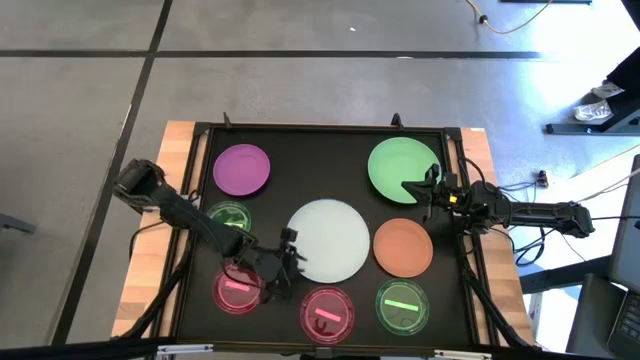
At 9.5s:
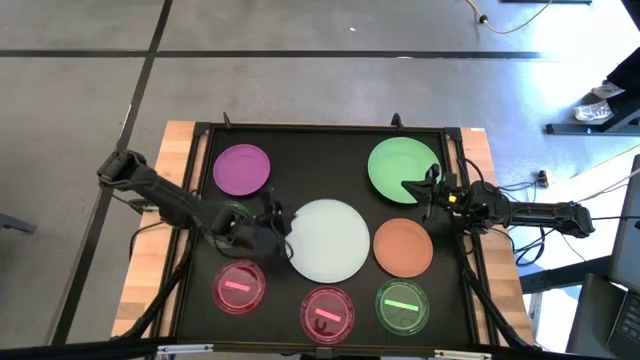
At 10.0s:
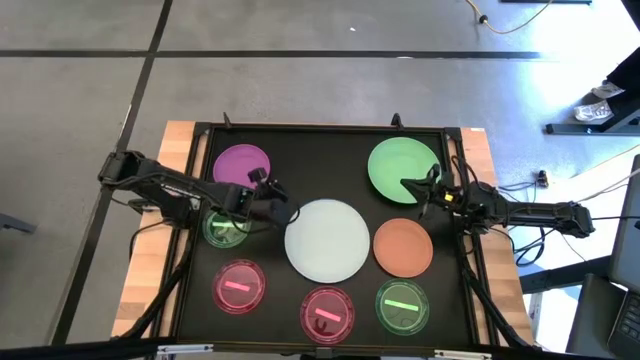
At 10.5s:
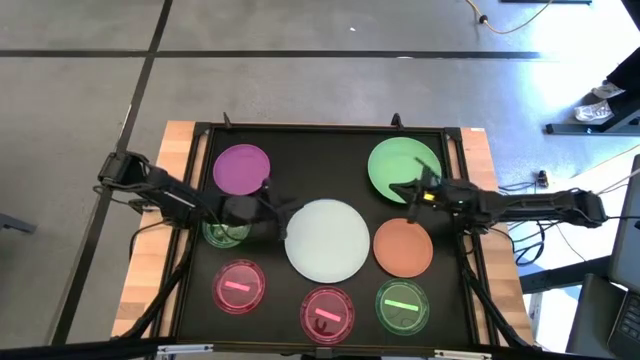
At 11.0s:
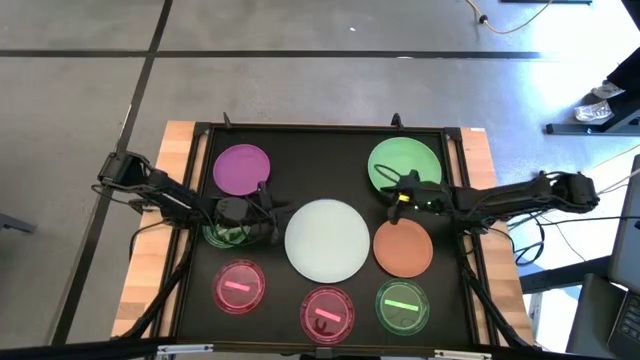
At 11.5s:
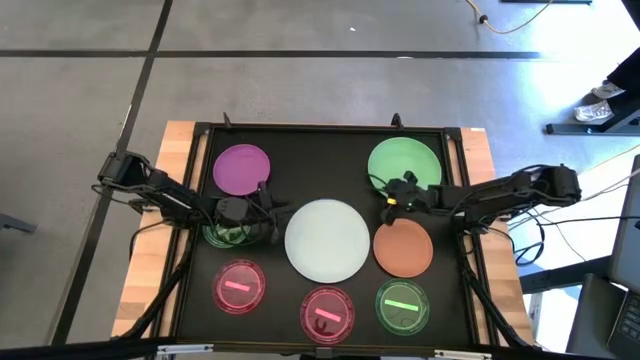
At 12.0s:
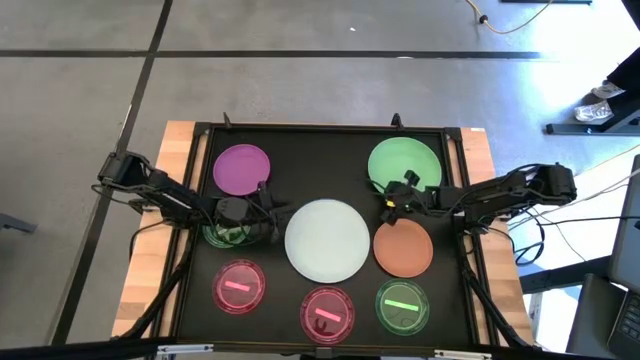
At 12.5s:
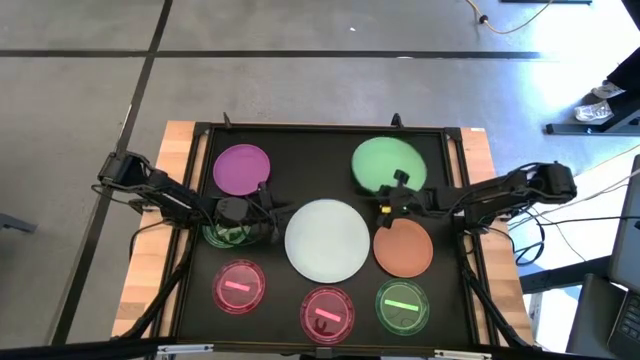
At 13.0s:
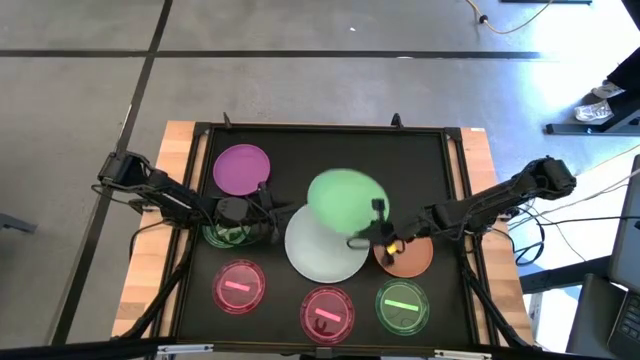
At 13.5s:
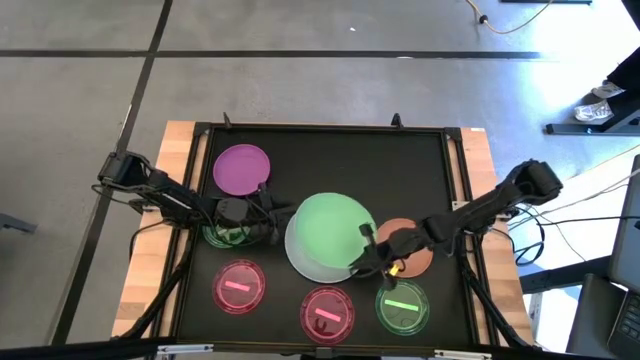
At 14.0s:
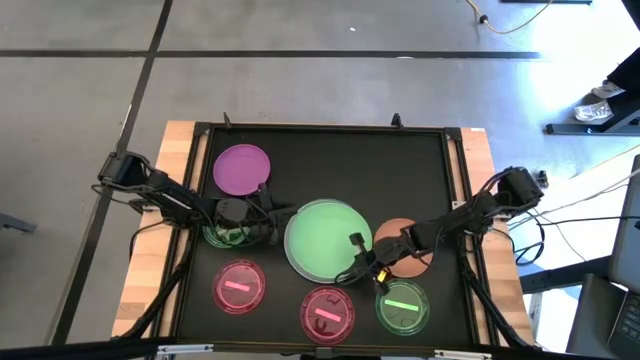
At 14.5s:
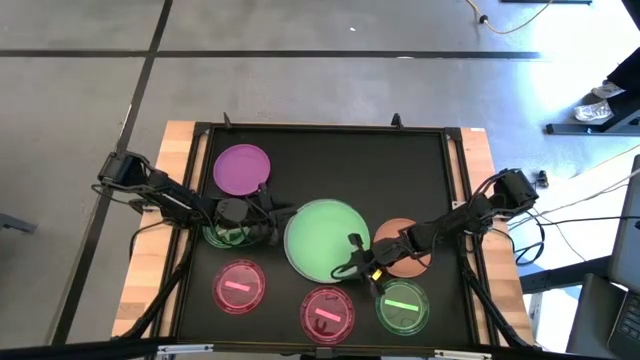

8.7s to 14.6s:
Task: Stack plastic plates
Stack the light green plate on top of the white plate

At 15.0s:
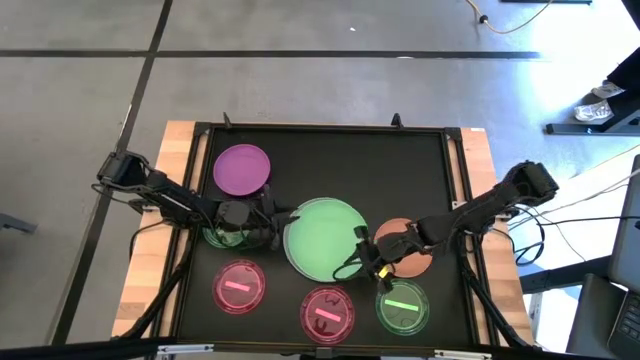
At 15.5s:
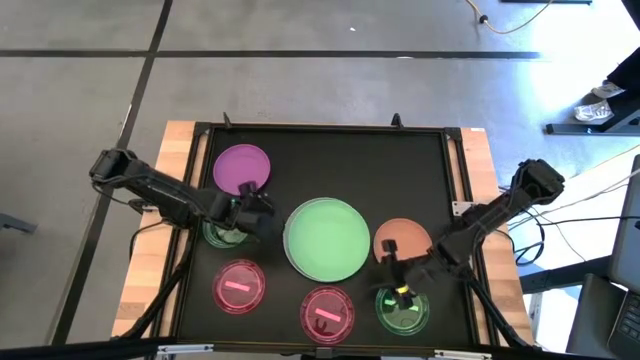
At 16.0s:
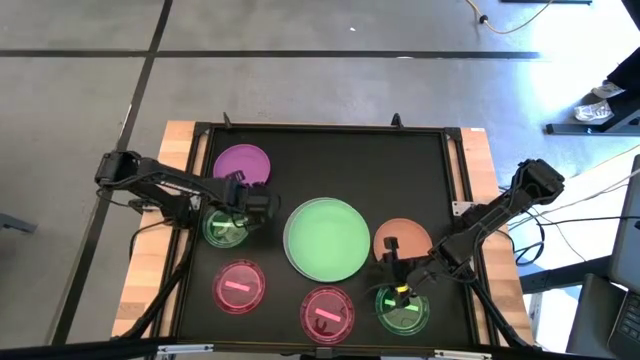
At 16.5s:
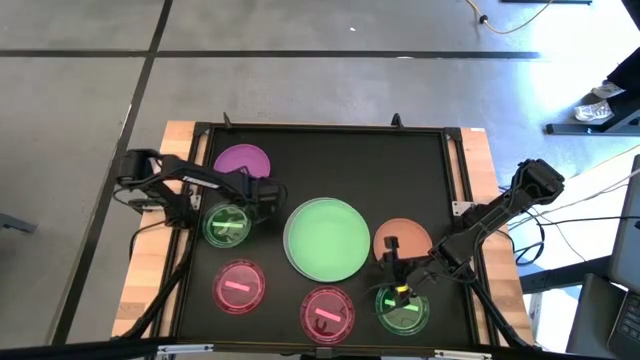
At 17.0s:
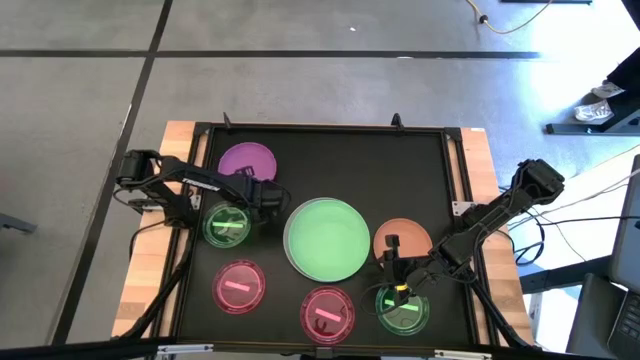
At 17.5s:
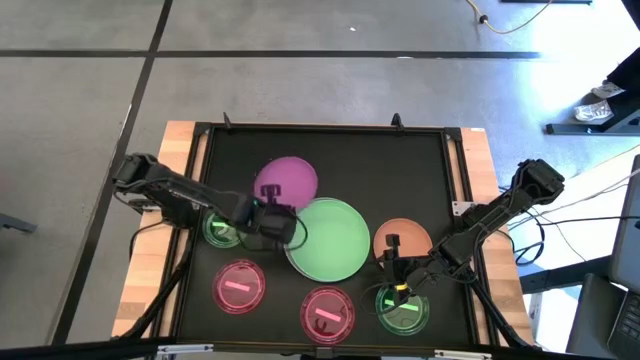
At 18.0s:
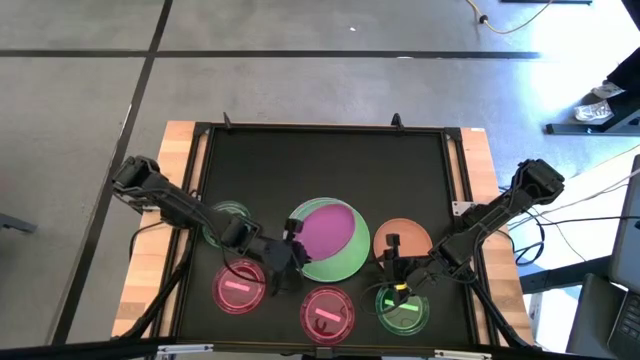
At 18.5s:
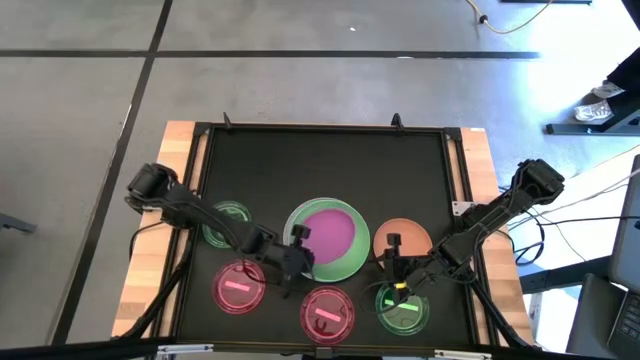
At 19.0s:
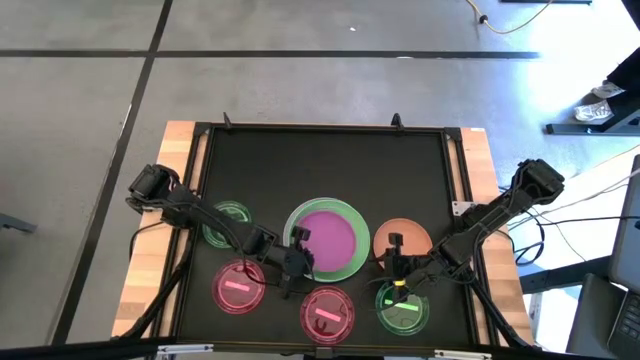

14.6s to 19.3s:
Stack the purple plate on top of the light green plate

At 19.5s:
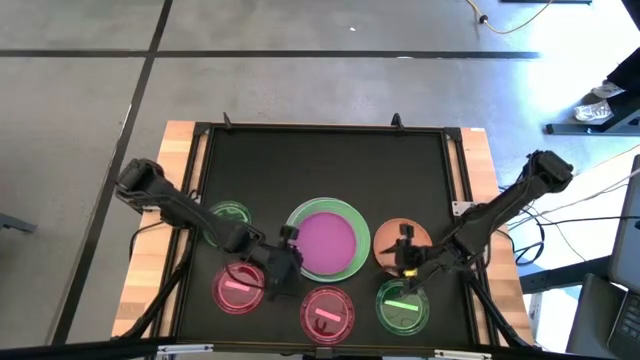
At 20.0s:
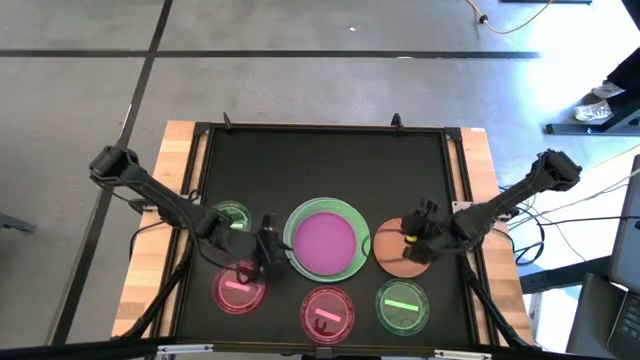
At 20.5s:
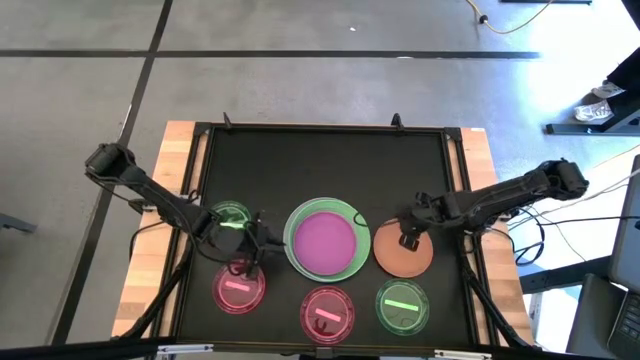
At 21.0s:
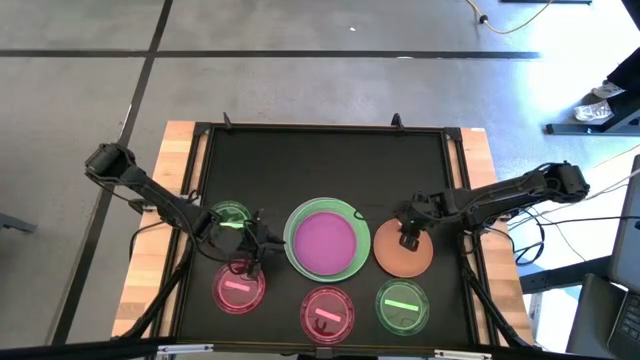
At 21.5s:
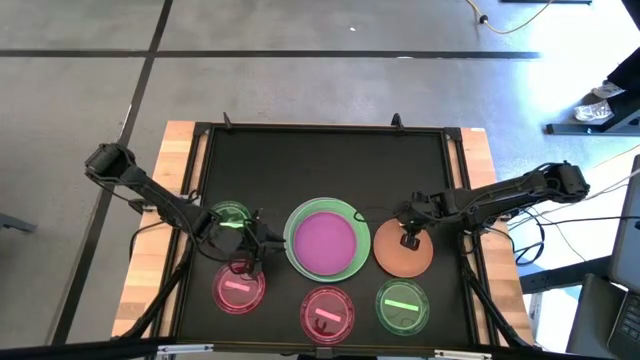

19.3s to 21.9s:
Stack the orange plate on top of the purple plate

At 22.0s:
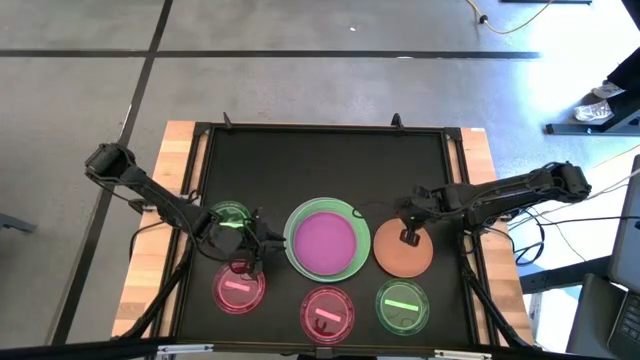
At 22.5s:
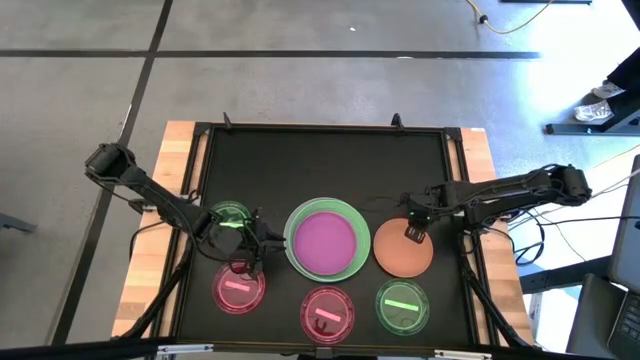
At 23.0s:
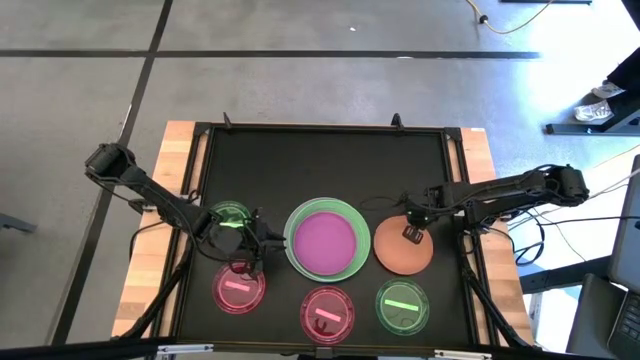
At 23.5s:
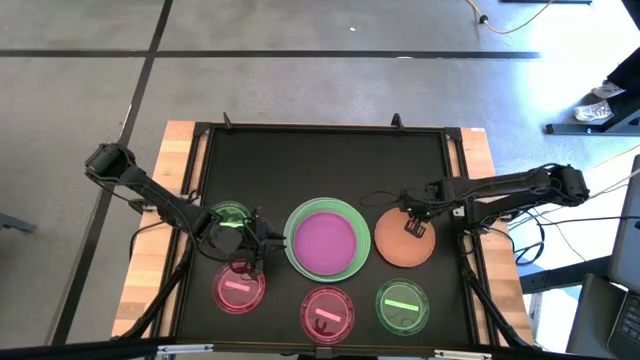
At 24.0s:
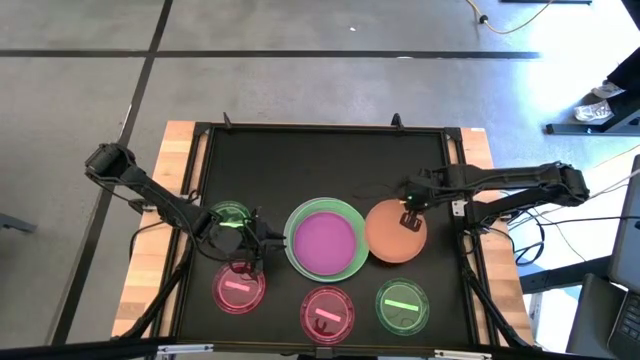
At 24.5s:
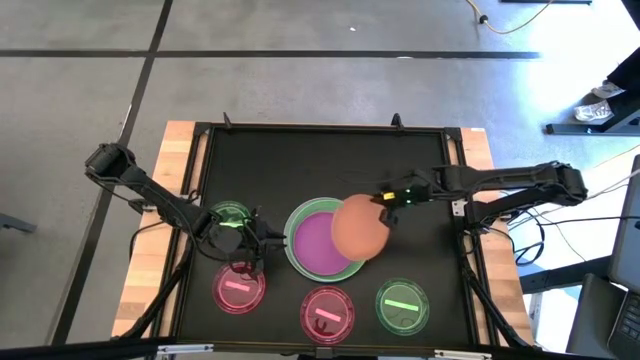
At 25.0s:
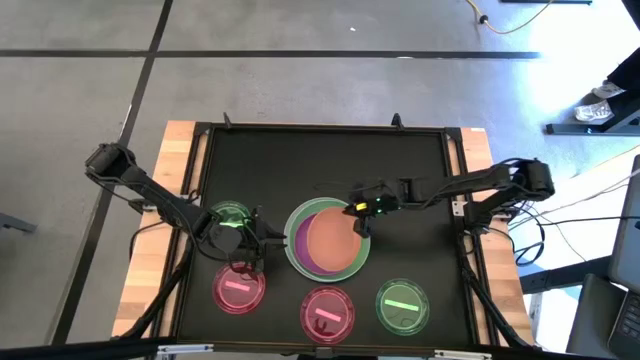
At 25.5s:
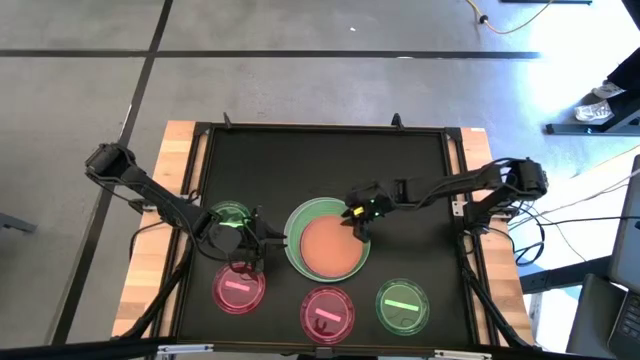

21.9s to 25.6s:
Stack the orange plate on top of the purple plate

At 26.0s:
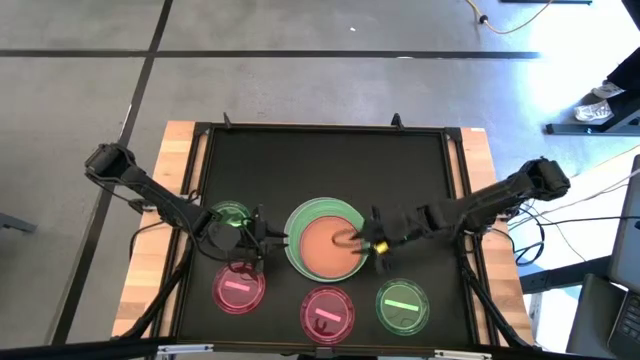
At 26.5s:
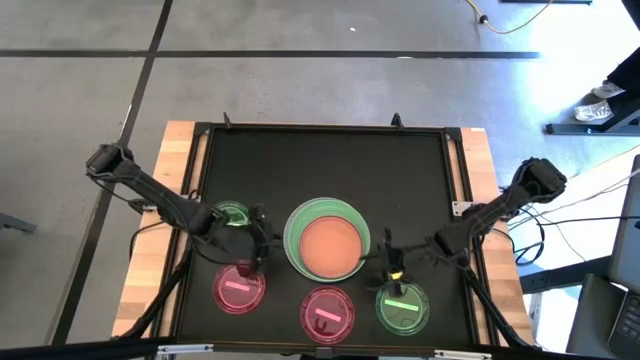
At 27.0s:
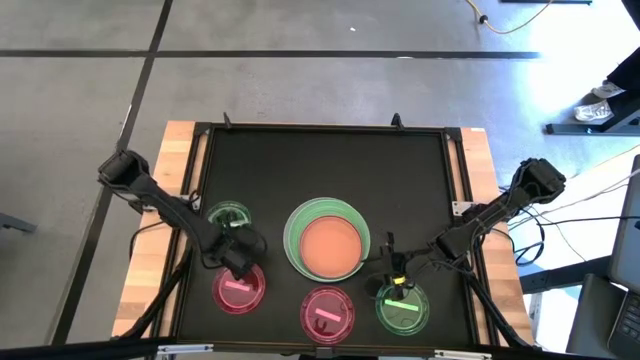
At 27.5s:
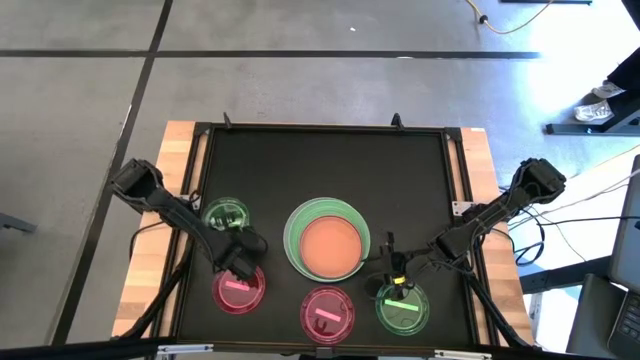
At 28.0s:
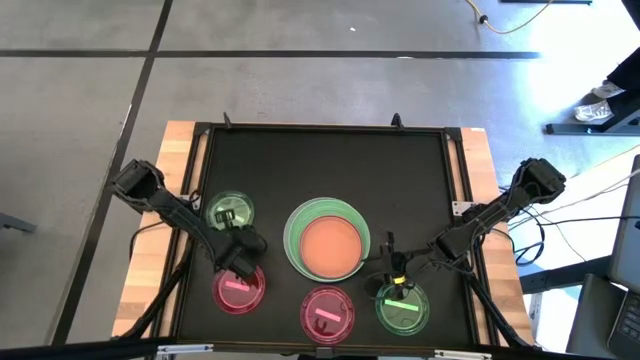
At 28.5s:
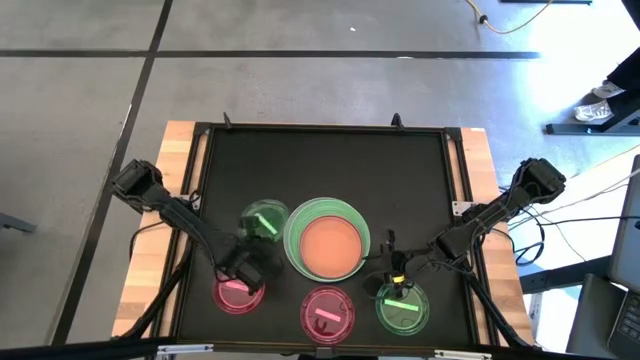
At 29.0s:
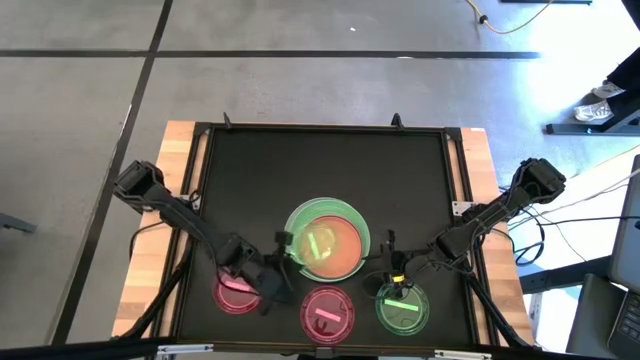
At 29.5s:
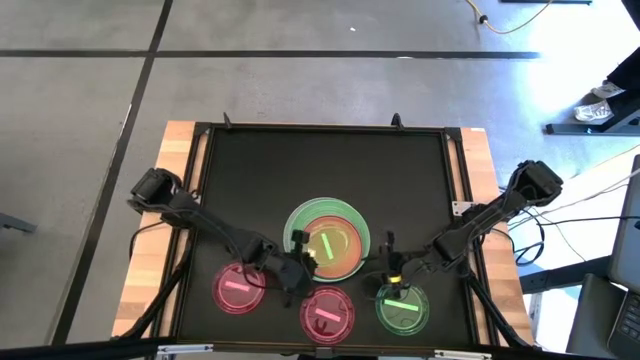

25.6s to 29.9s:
Stack the left transparent green plate on top of the orange plate
